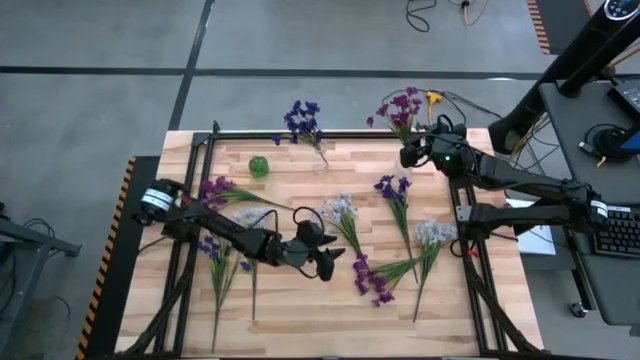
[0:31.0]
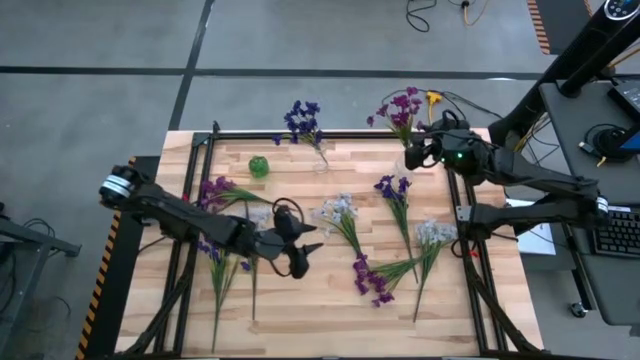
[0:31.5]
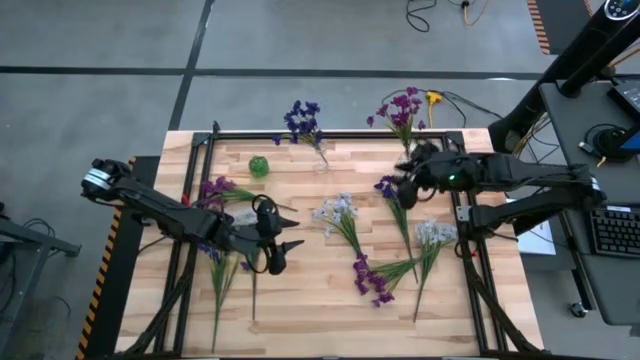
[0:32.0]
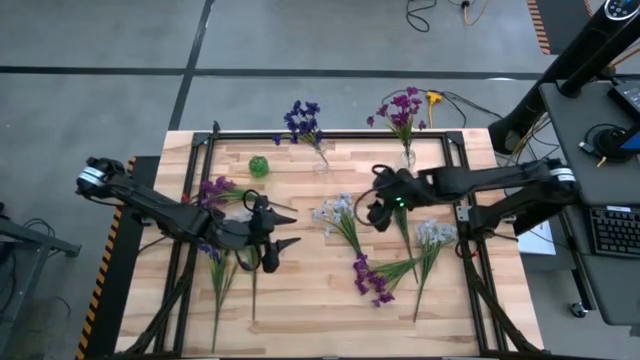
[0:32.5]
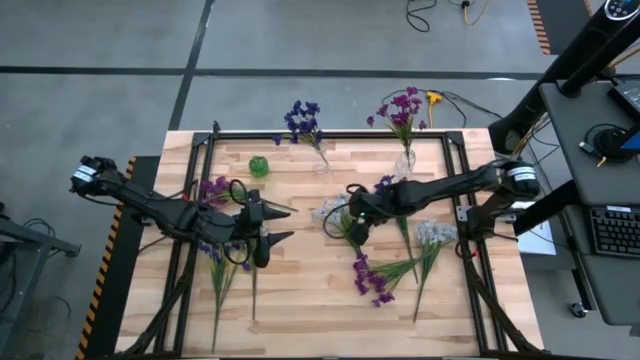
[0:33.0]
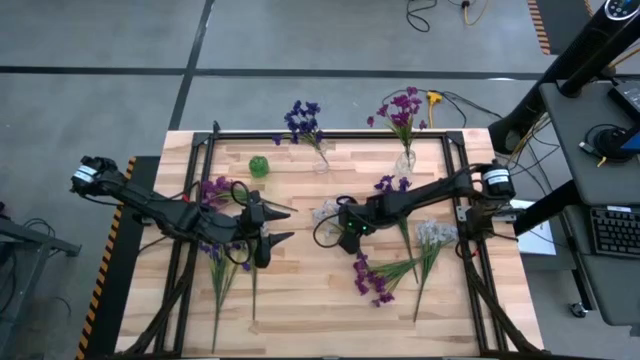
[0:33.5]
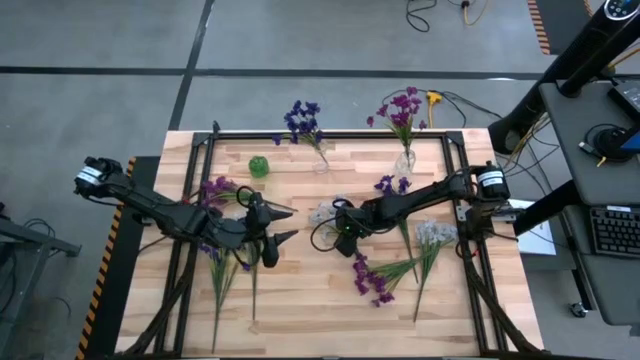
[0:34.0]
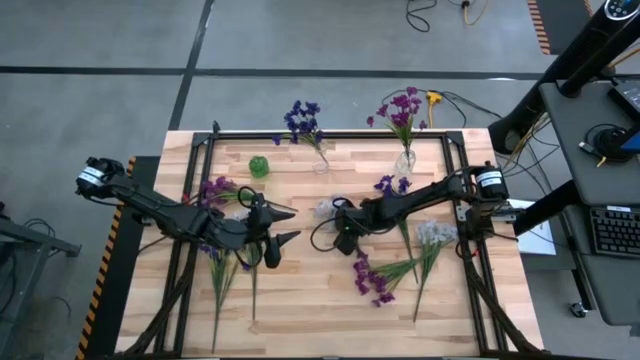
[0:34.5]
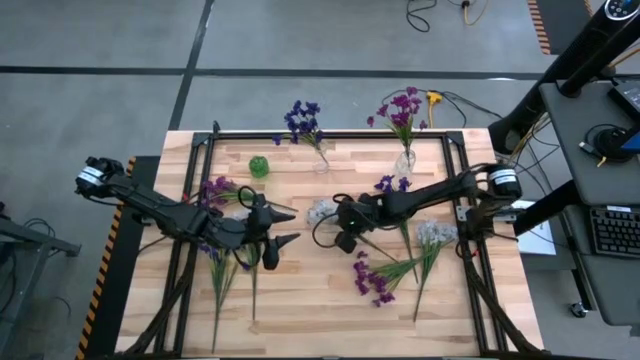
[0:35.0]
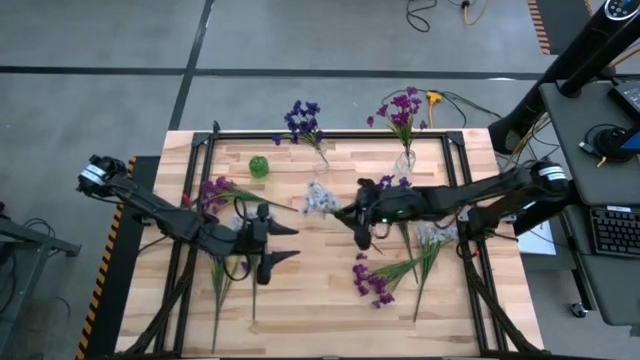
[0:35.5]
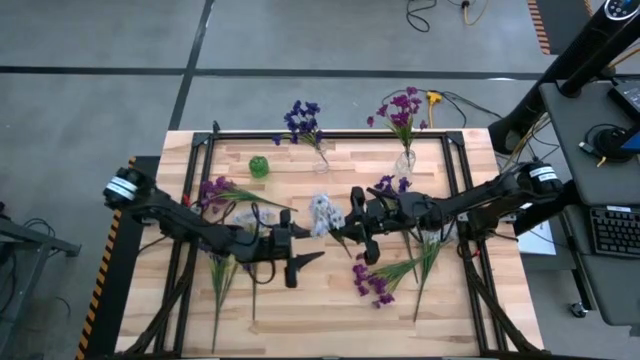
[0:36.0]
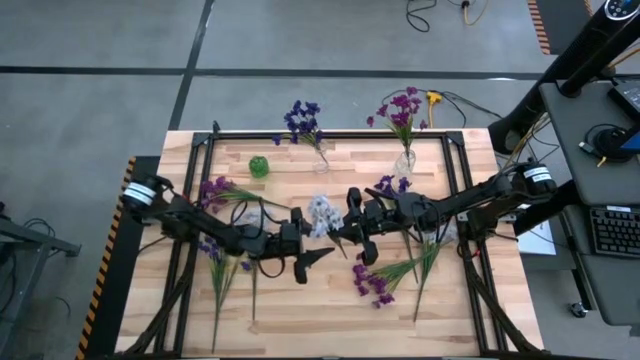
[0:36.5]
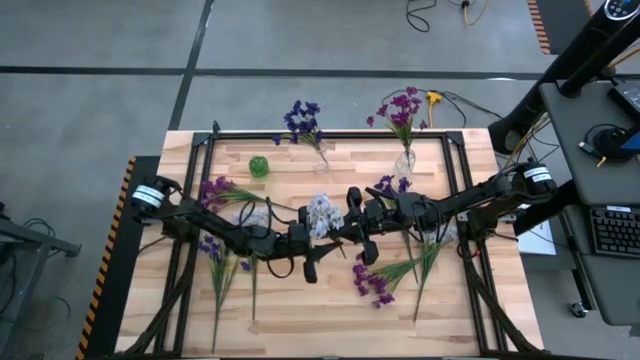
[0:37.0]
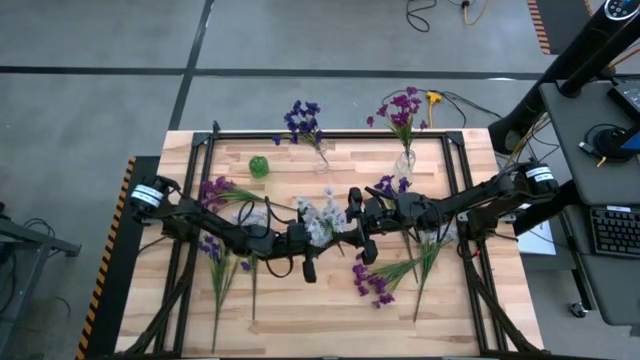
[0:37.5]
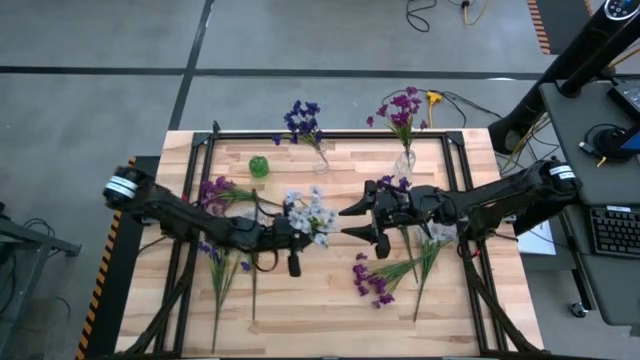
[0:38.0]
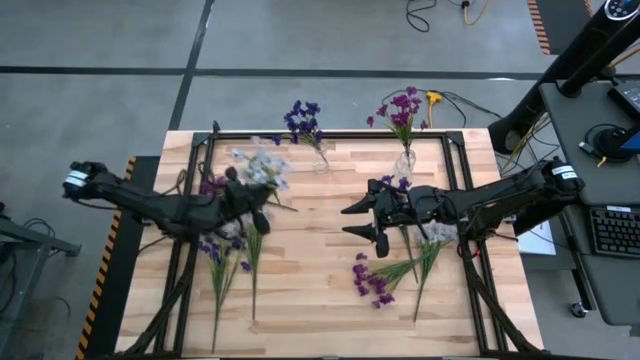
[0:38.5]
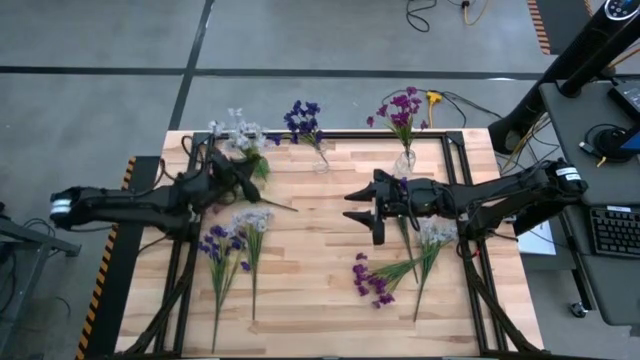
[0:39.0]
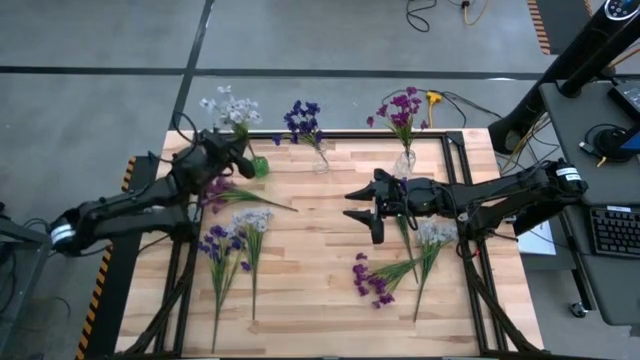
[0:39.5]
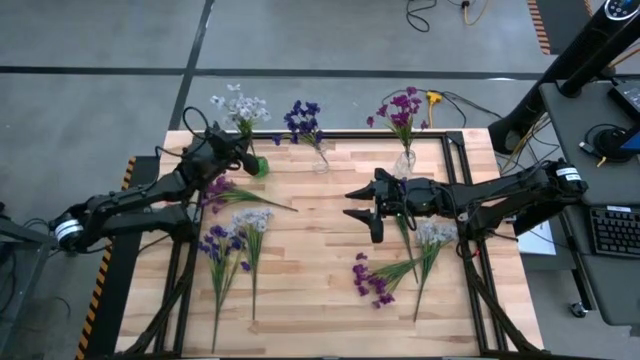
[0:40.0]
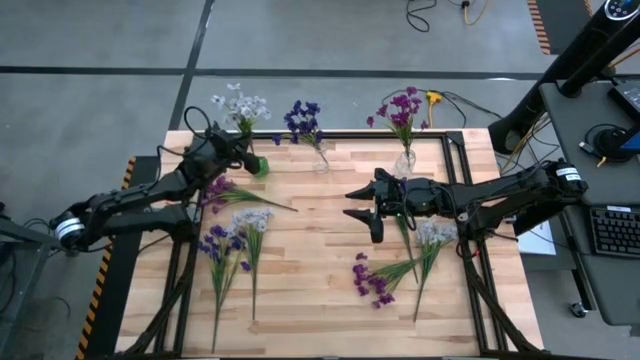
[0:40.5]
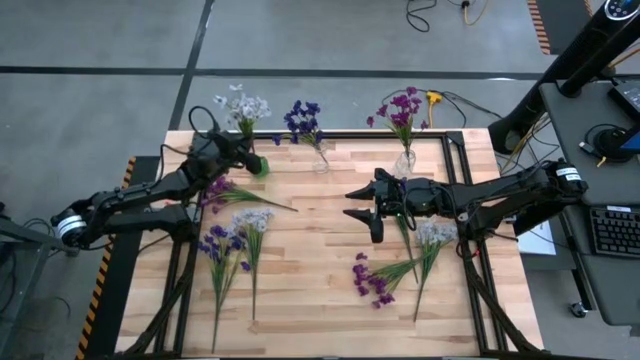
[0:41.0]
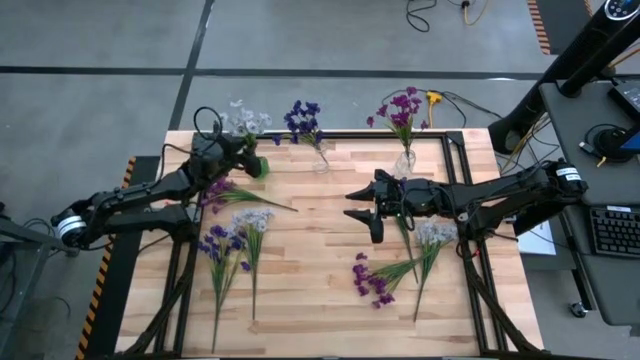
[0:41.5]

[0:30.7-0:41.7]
Task: Sort flowers into vase by color
Put the middle white flowers into the green vase

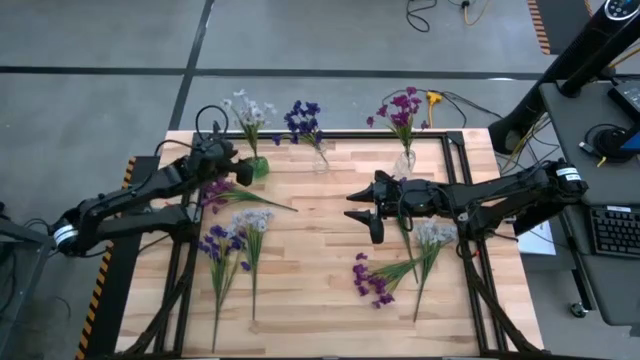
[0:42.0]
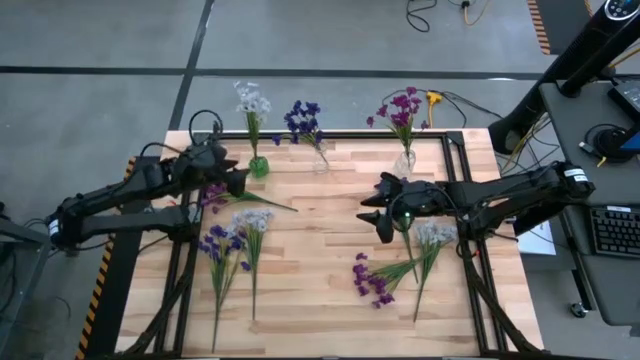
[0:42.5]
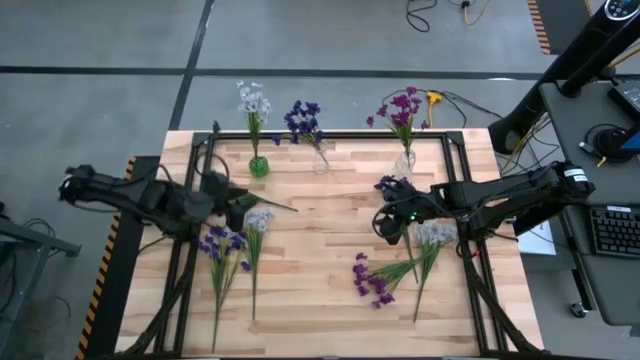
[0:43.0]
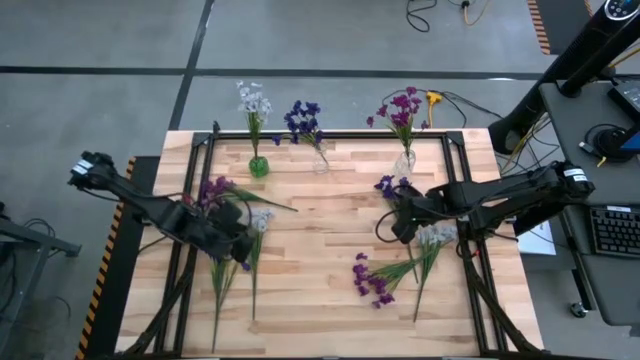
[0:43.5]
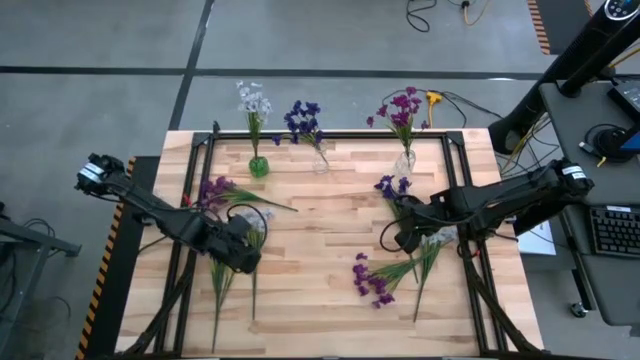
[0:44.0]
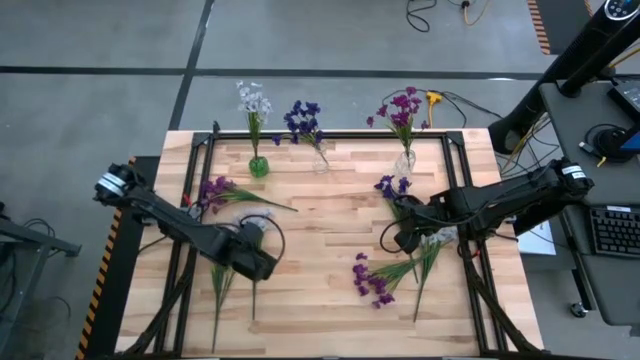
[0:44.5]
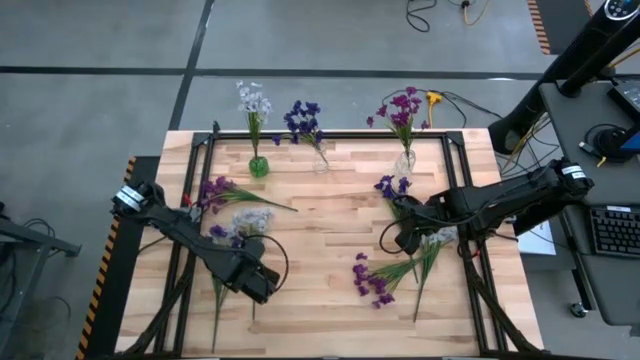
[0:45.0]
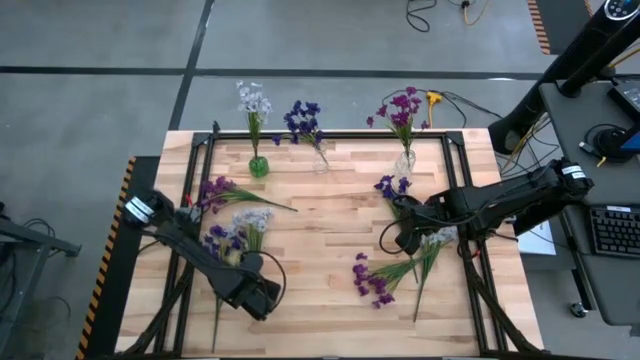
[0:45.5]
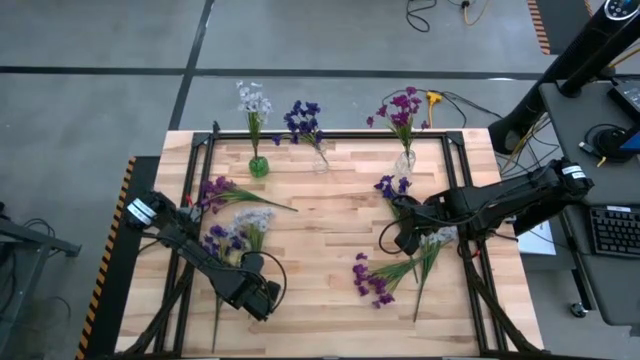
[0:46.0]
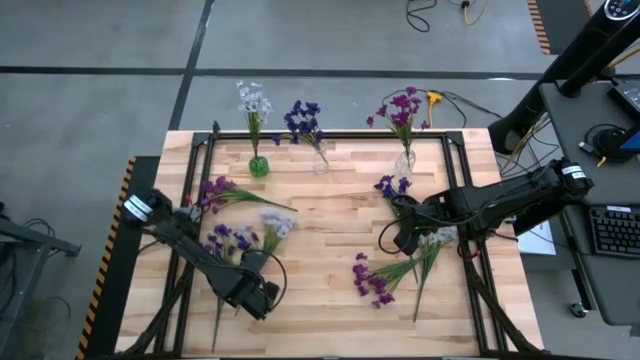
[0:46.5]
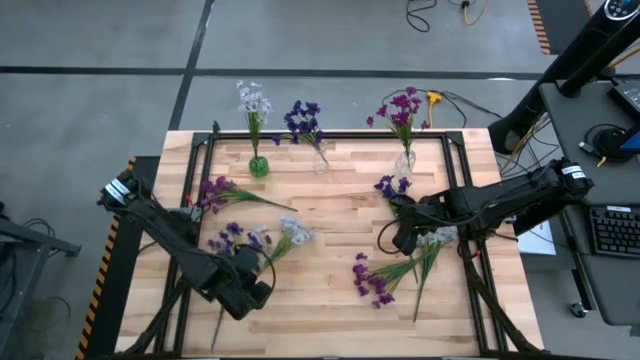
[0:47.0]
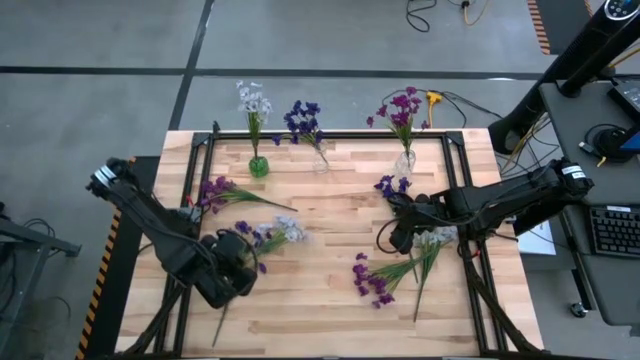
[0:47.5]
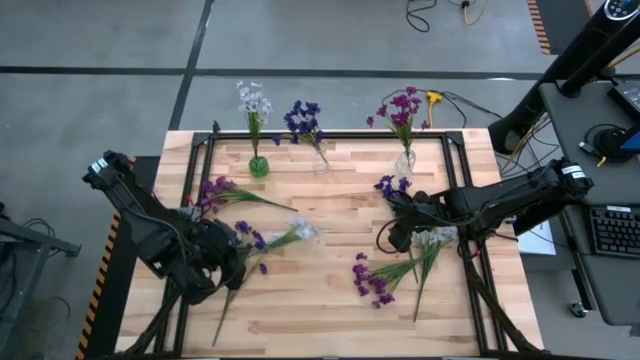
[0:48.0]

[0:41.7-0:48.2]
Put the left white flowers into the green vase

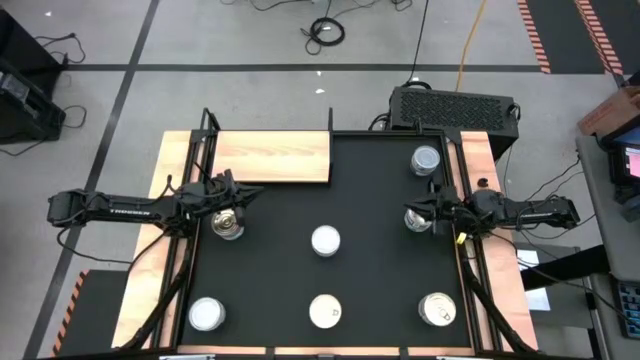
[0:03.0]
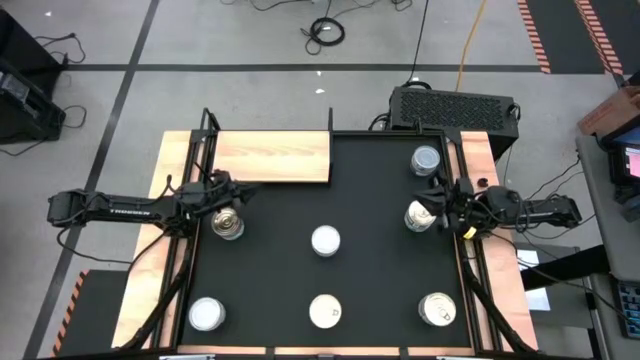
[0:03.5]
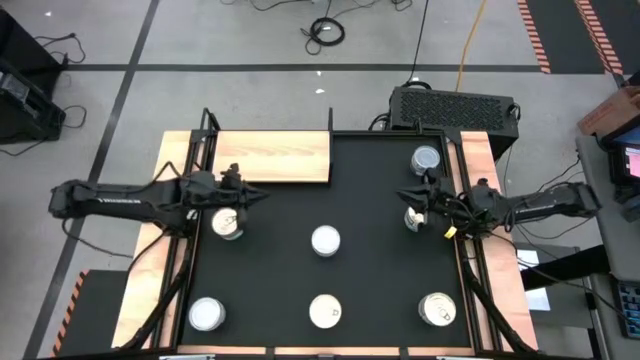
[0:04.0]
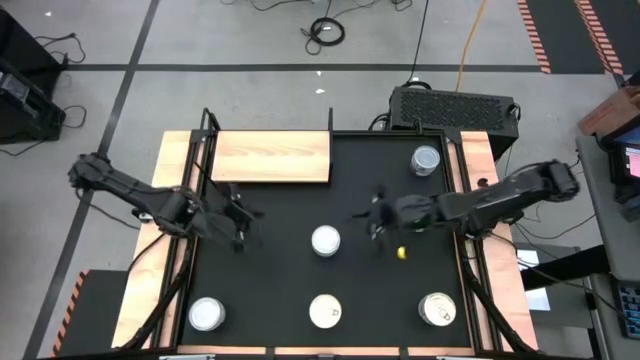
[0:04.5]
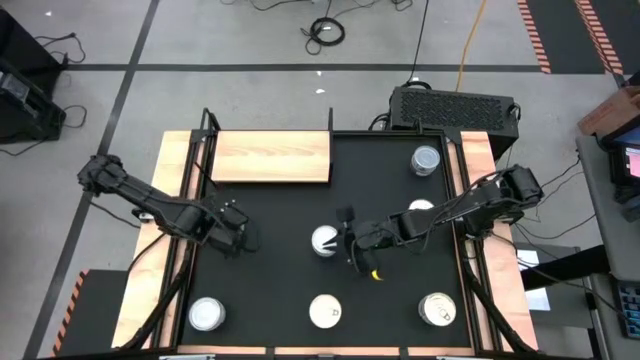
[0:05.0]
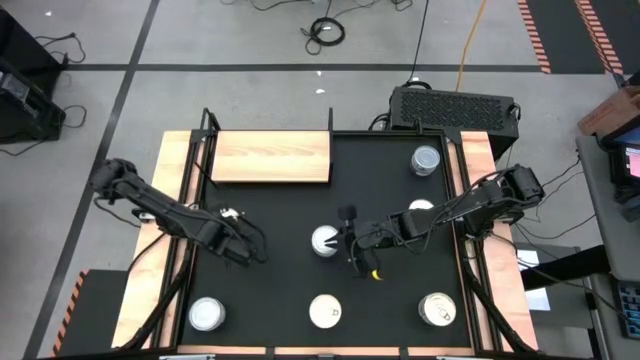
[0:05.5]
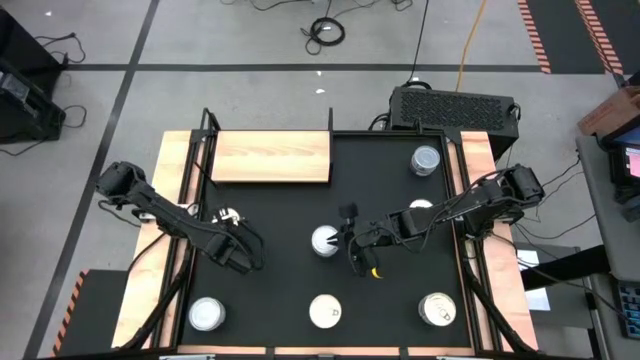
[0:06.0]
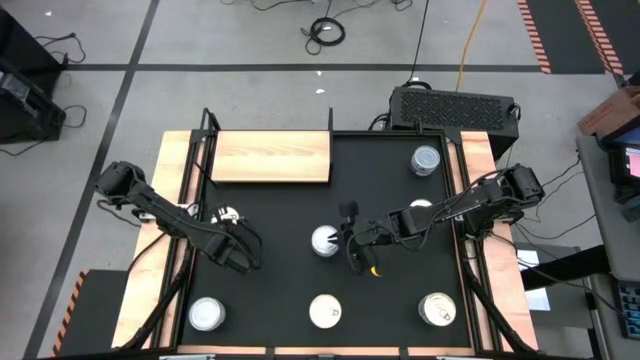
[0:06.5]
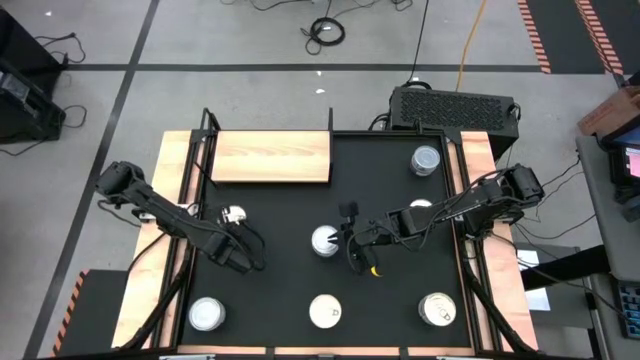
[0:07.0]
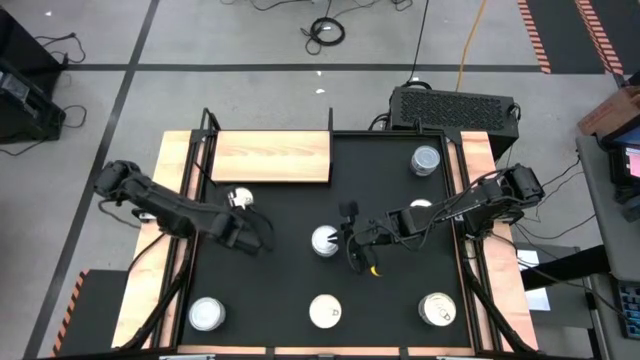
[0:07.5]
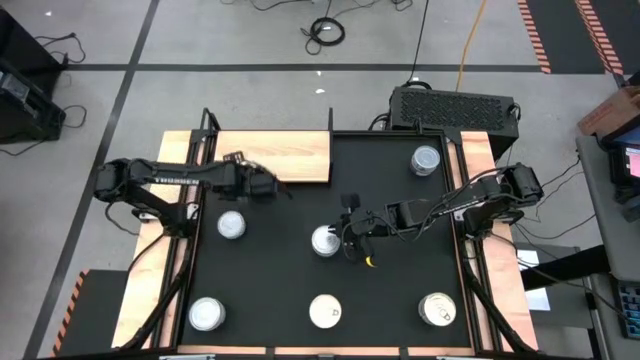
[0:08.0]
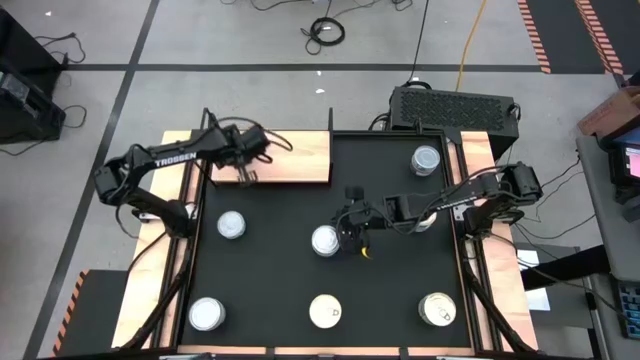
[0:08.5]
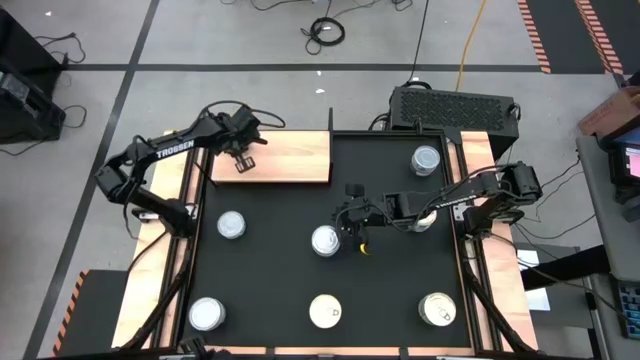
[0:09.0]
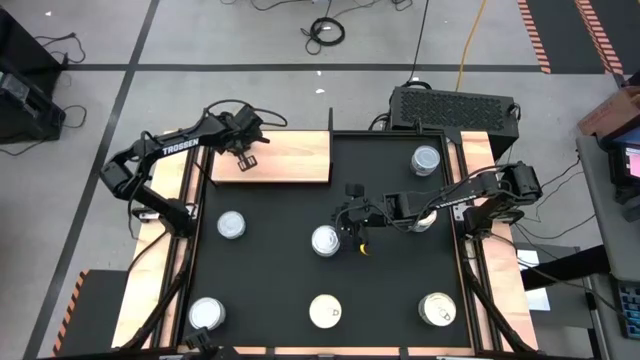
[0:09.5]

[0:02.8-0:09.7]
Task: Stack canned seafood by type on shelf
Put the blue tuna can on the shelf
